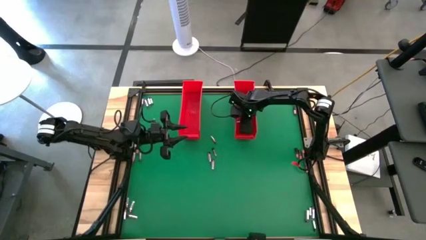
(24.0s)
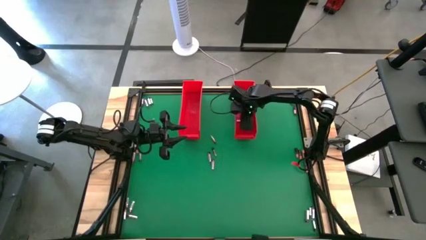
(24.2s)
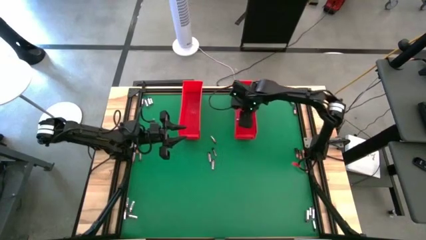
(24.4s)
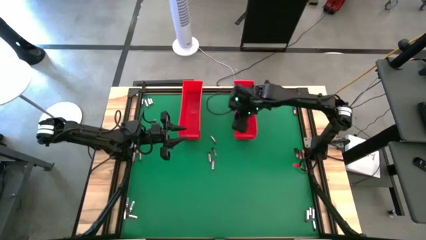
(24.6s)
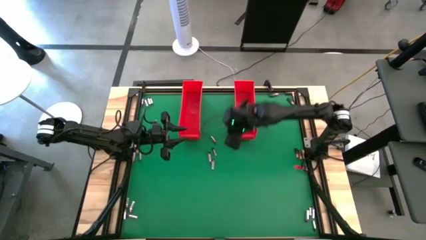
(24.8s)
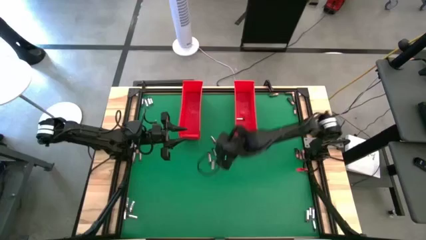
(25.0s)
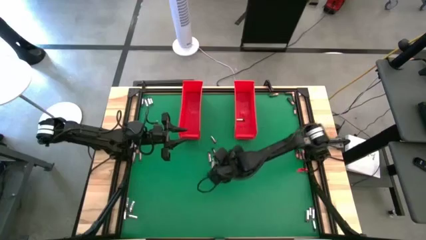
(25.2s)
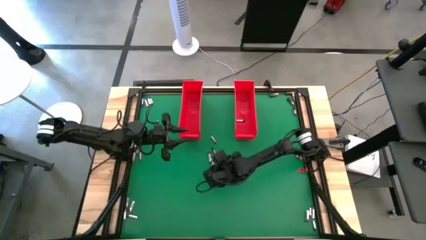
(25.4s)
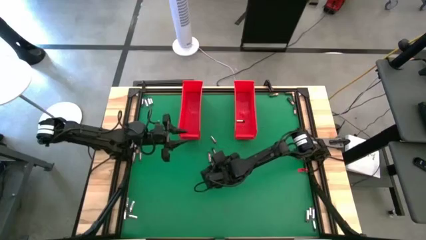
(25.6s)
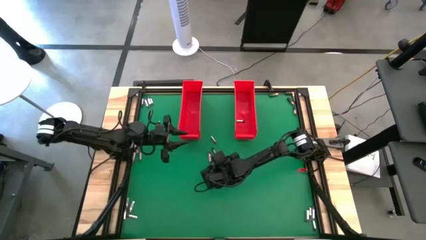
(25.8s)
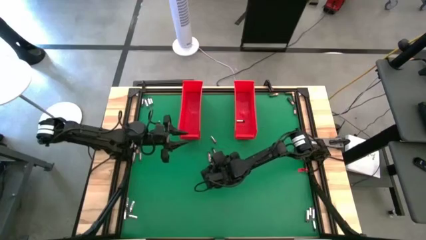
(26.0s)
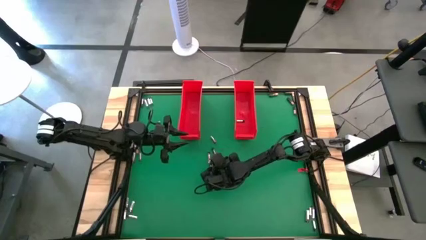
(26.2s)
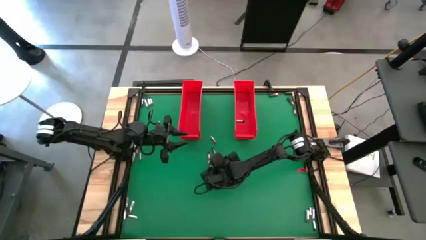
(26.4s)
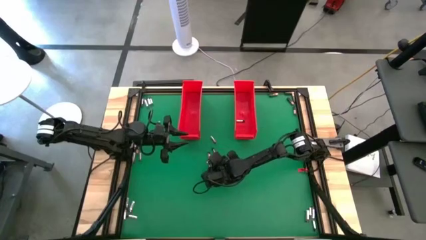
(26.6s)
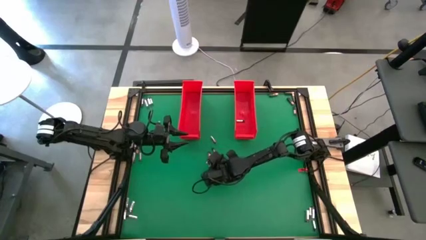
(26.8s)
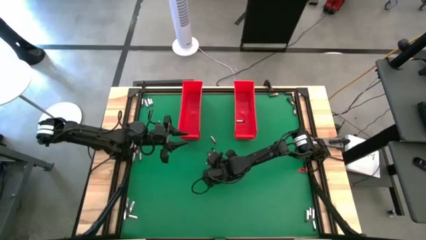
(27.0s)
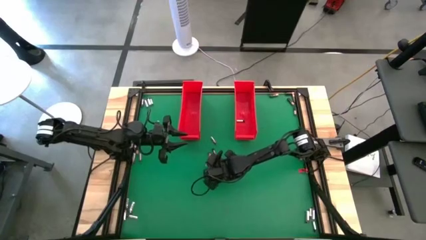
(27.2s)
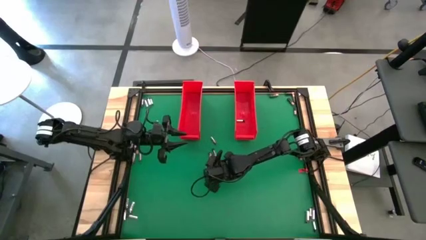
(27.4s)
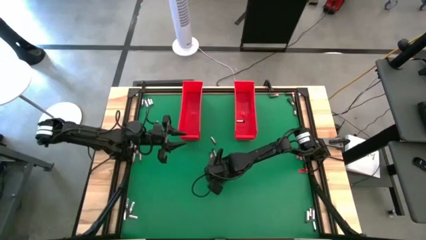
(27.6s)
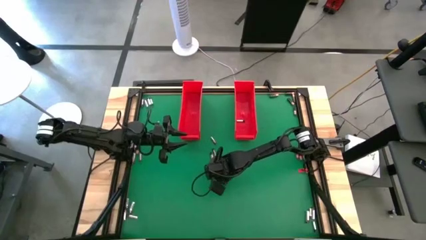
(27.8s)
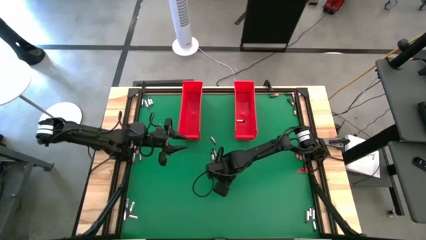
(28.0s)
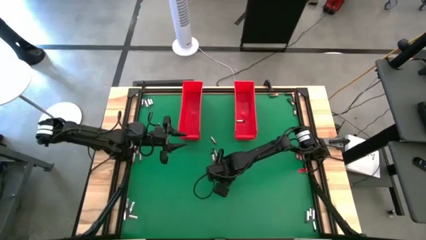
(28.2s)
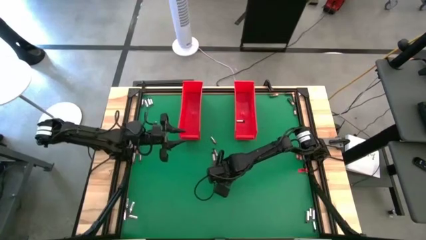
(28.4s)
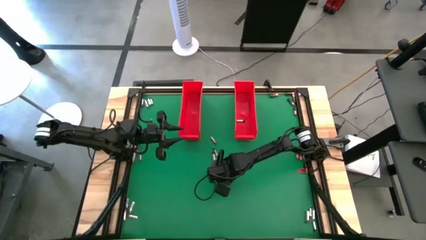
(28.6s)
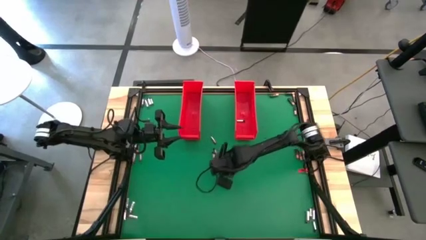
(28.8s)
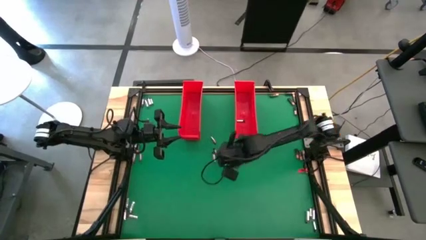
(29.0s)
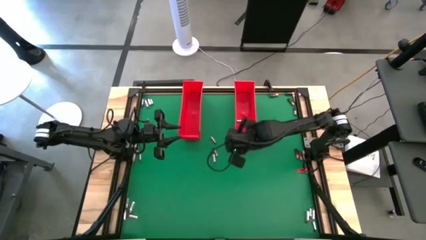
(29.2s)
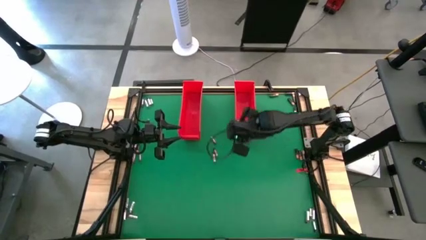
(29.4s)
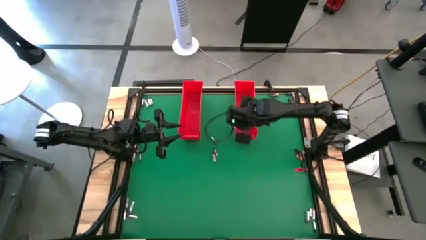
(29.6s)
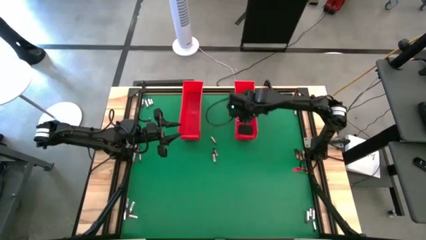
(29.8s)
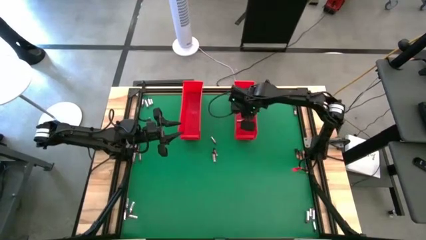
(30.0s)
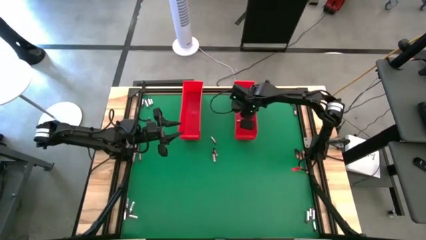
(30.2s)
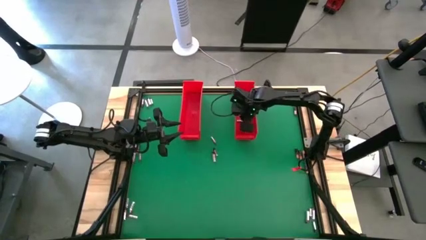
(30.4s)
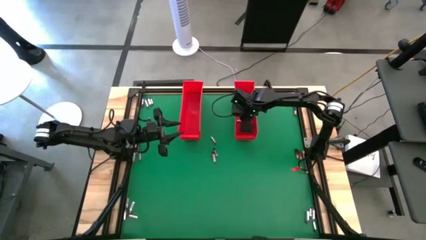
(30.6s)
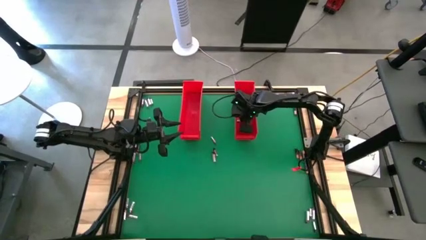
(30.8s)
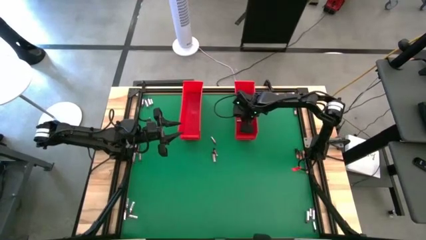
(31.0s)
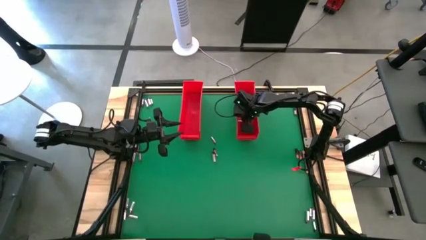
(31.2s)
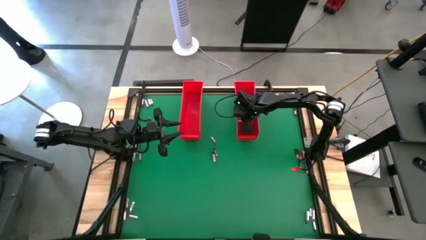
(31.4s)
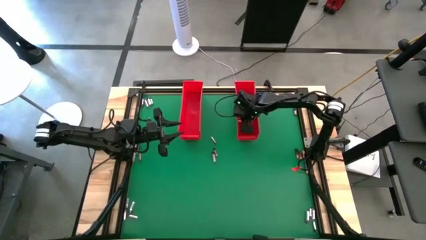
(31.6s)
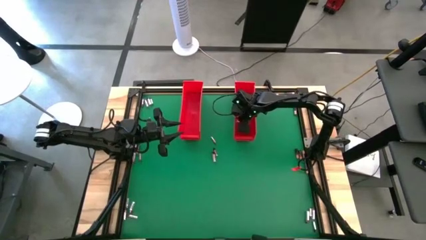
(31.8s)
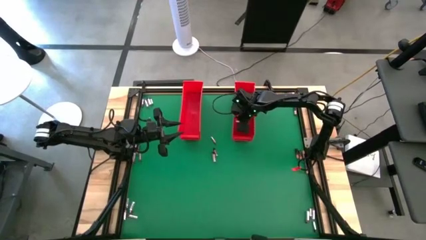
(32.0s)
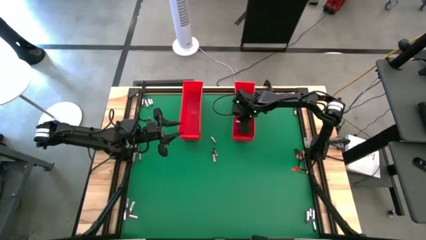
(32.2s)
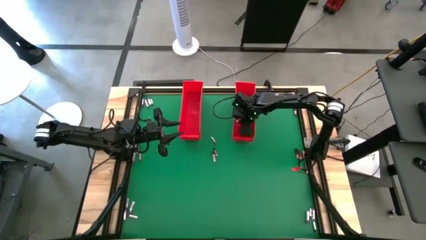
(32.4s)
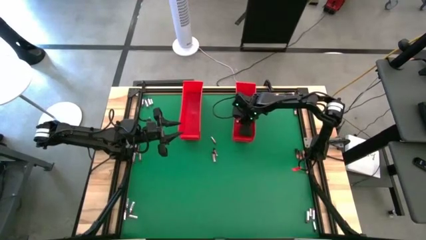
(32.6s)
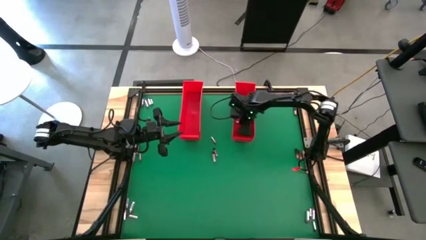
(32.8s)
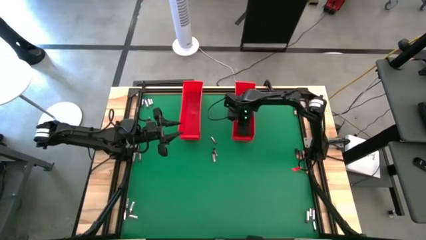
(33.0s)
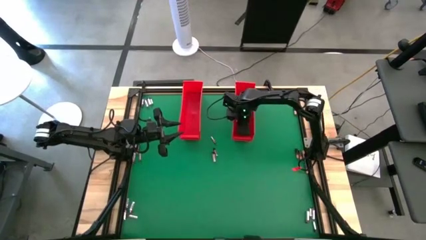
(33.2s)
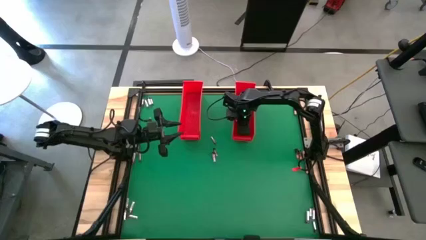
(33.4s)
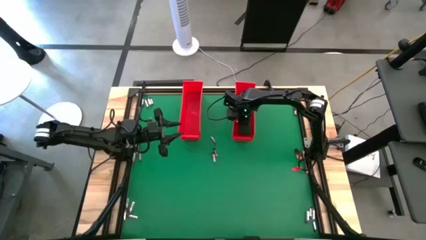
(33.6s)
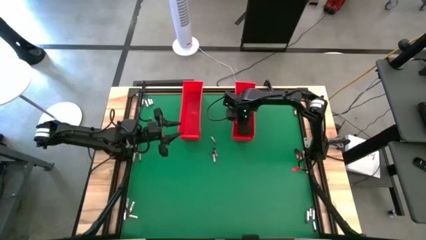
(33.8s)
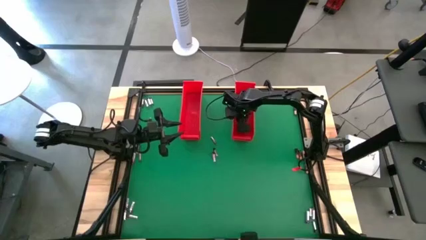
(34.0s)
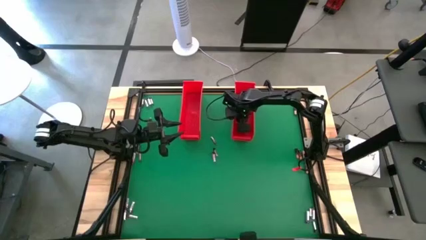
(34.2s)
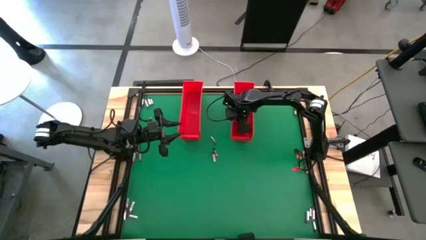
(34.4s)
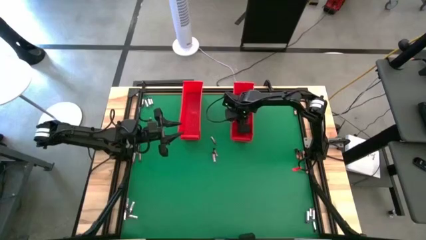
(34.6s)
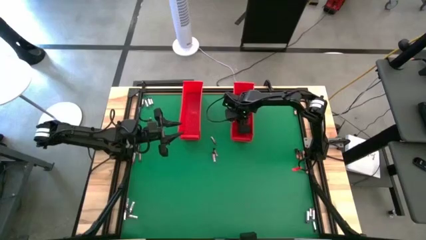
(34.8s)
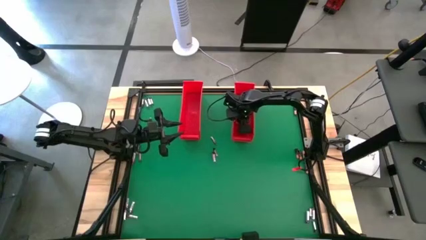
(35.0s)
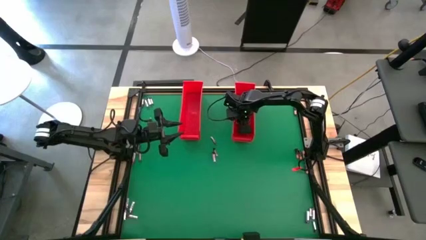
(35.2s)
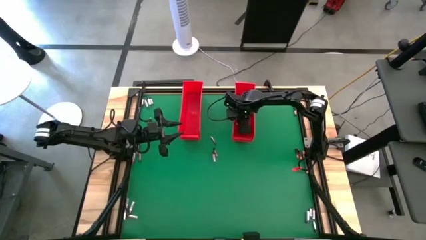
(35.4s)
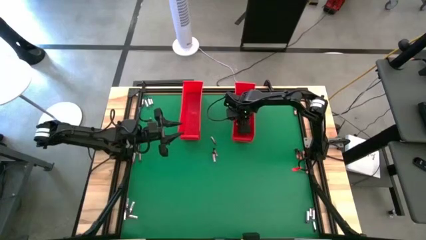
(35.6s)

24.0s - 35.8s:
Task: Sort batteries
Put the silver battery into the right red bin

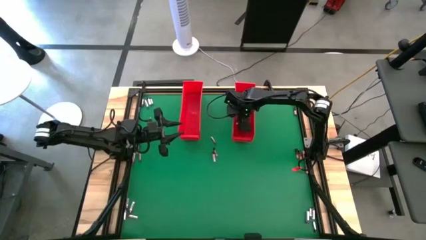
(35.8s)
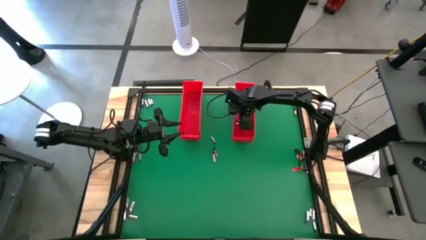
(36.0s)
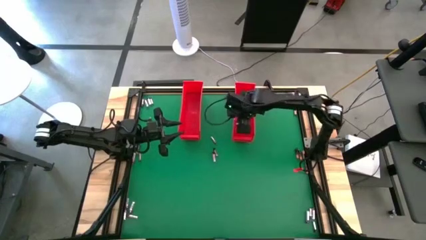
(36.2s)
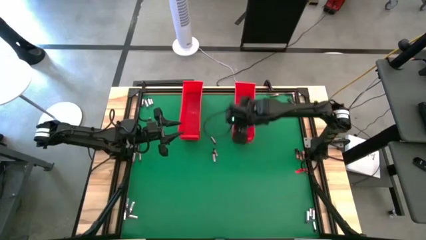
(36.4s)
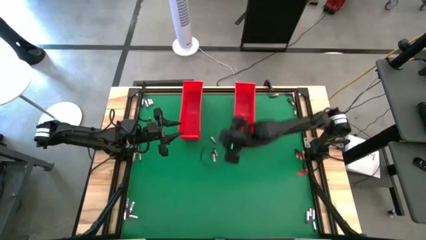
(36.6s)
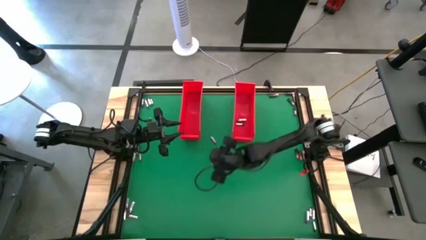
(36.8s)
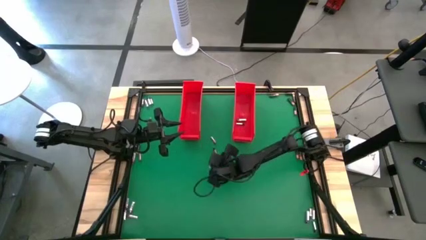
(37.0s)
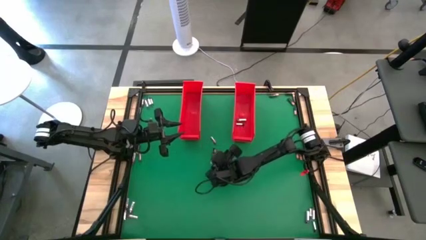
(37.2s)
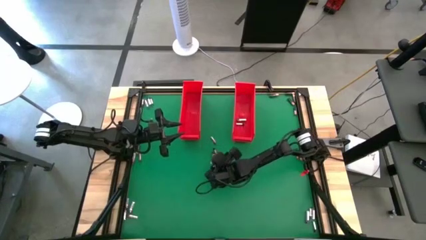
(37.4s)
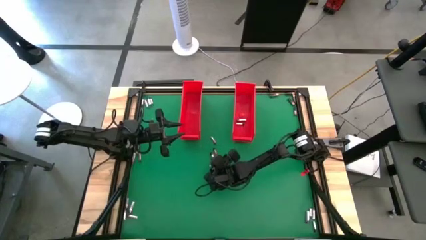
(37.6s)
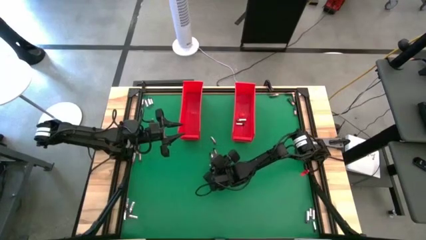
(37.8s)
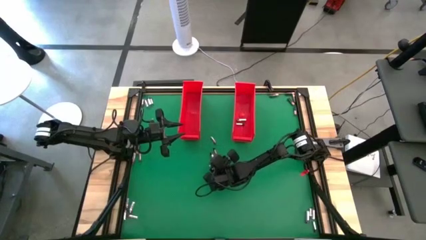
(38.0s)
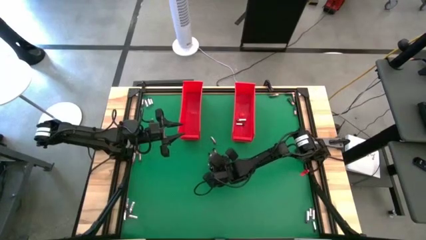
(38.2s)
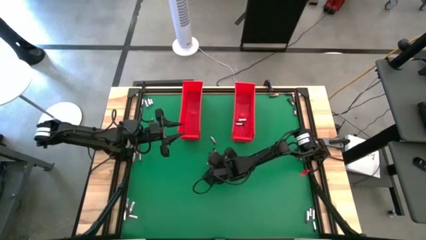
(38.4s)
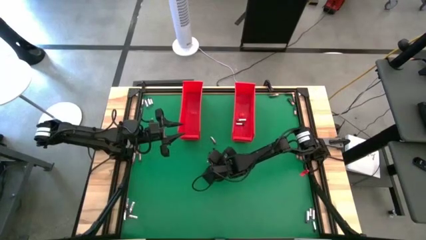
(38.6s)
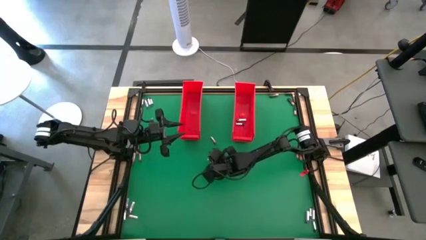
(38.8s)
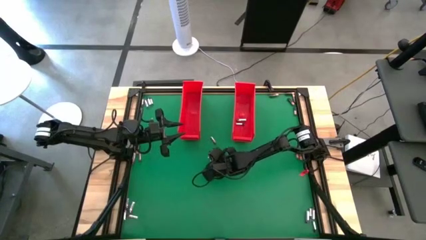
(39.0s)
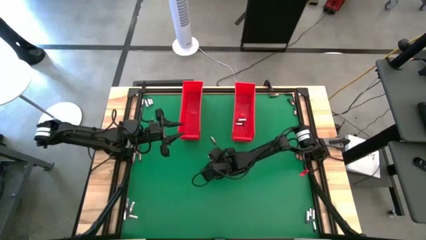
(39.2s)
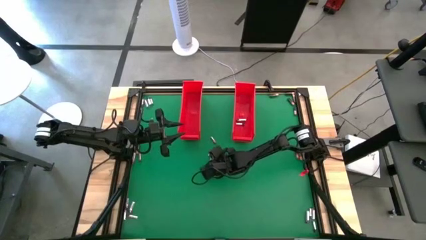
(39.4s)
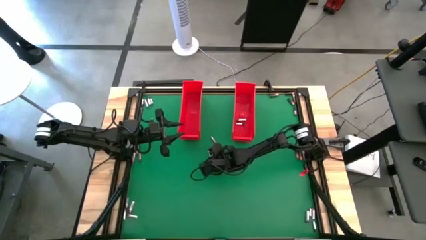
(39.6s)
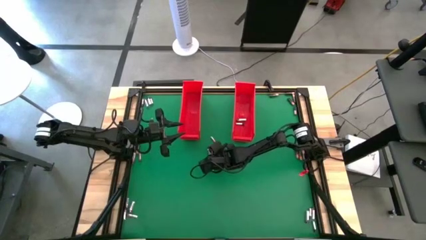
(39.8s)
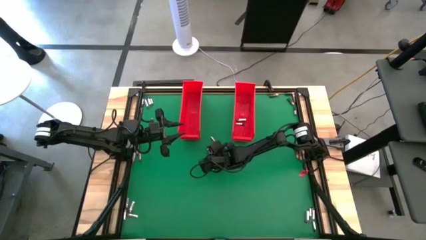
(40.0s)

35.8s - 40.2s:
Put the silver battery into the right red bin
